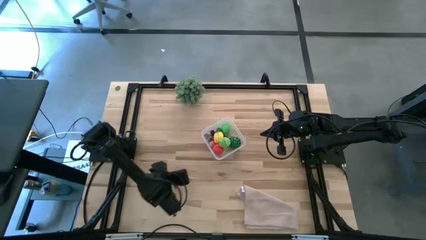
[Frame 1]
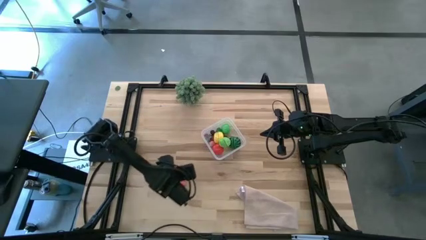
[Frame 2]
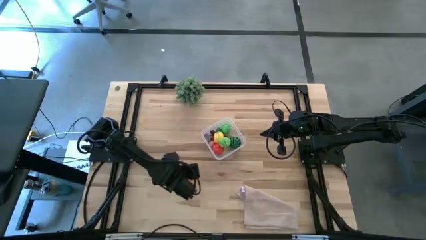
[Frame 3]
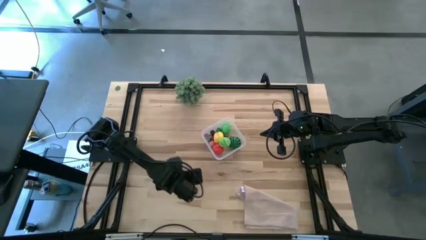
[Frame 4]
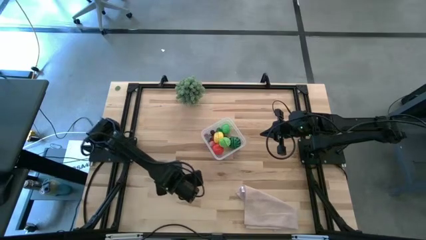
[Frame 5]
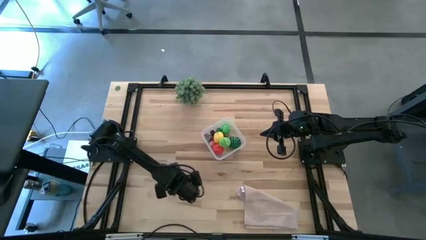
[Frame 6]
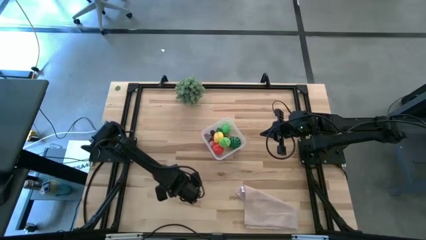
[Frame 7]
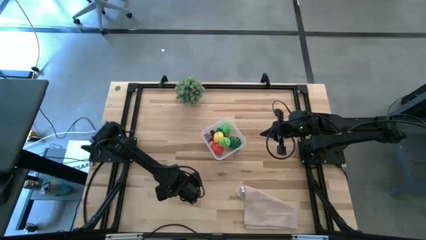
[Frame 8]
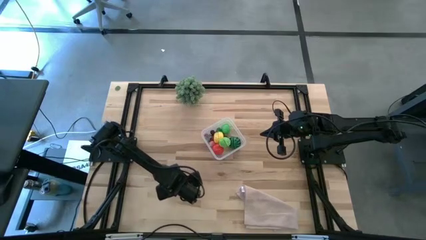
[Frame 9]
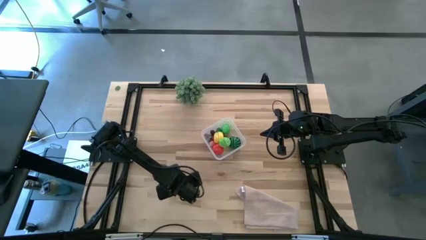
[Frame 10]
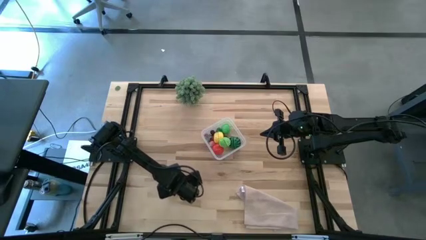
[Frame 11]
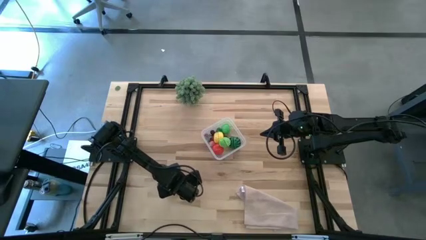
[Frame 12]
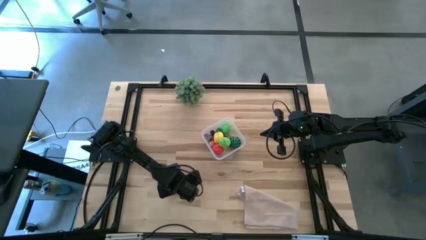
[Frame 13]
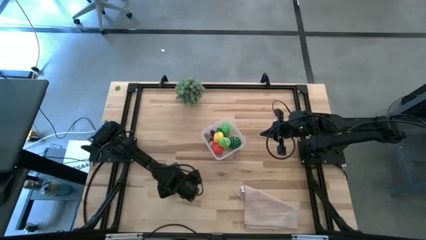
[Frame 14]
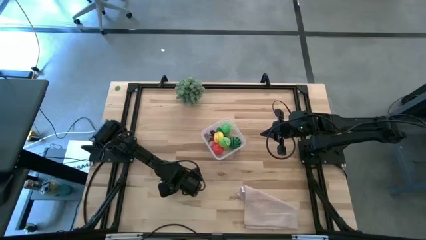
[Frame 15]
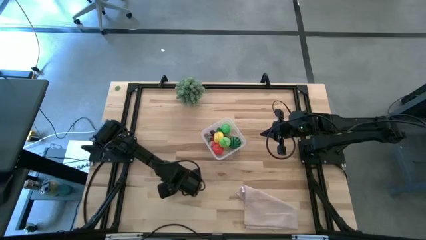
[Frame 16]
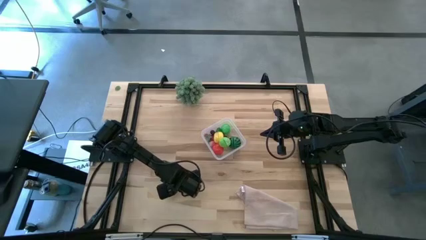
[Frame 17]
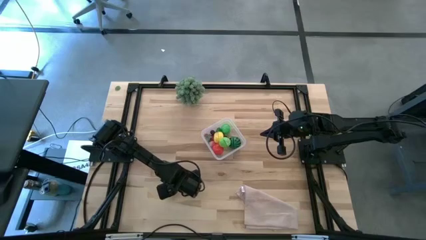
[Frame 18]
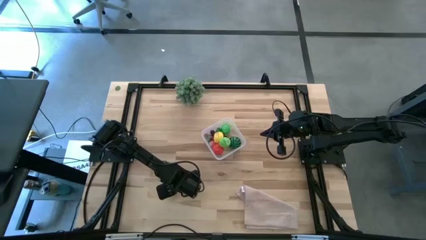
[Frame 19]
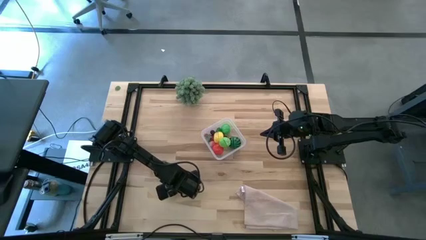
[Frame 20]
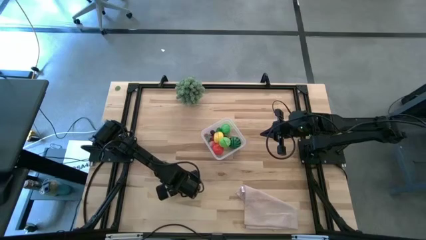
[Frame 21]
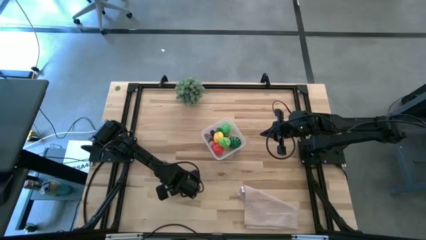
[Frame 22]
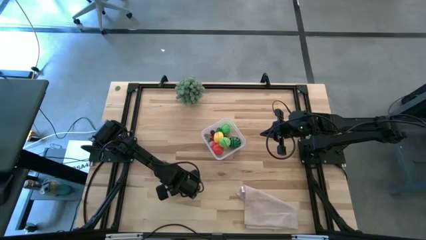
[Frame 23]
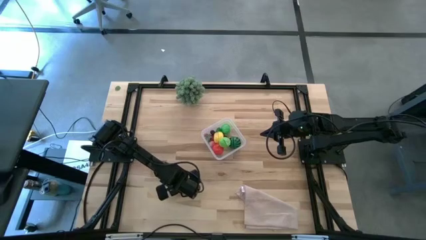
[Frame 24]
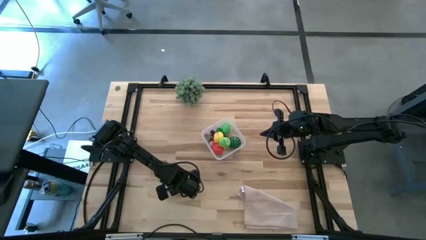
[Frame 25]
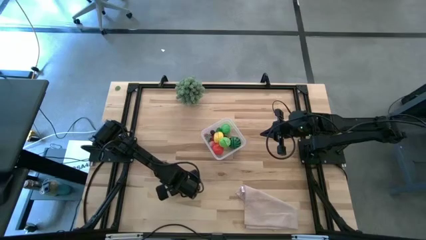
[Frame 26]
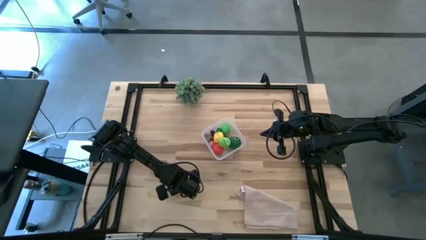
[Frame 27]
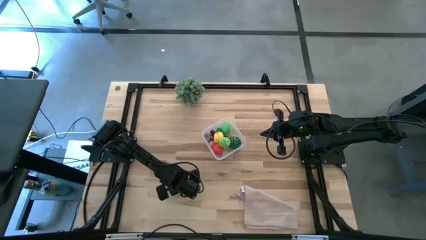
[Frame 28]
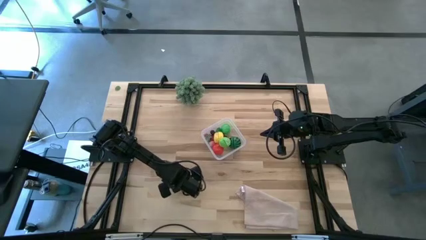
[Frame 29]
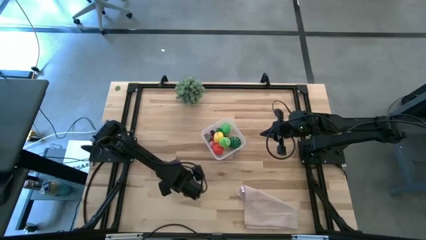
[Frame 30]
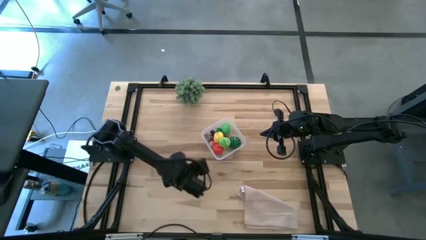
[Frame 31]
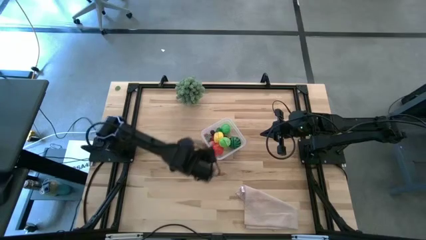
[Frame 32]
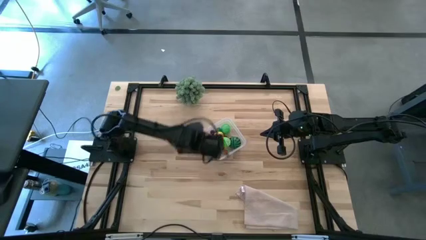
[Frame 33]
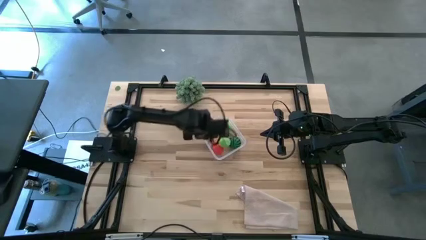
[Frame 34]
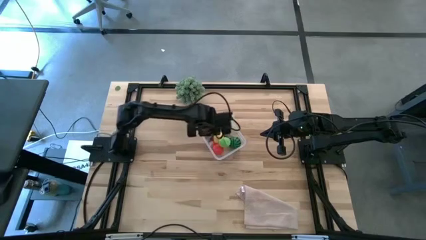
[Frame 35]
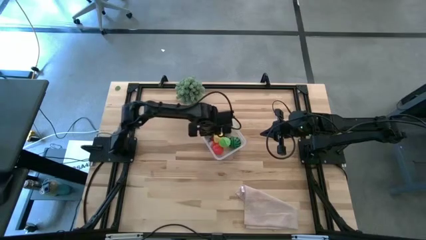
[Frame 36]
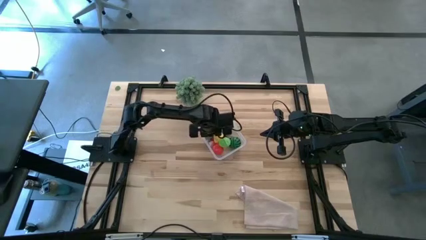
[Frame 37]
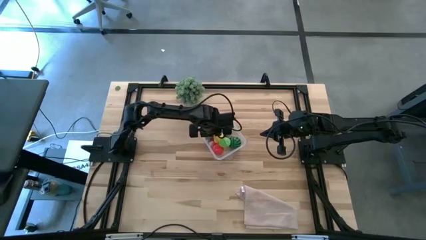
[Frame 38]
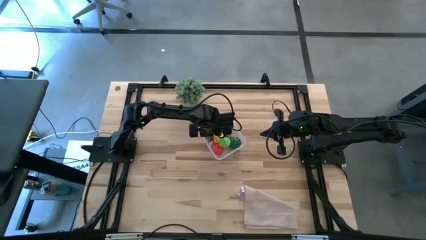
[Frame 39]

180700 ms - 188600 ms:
Task: Pick and placing Produce into tupperware
Put the red cherry into the transparent bin

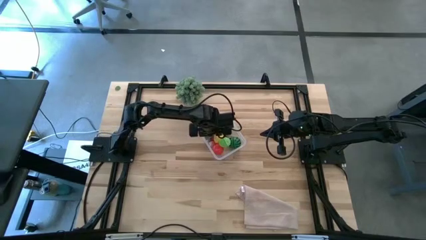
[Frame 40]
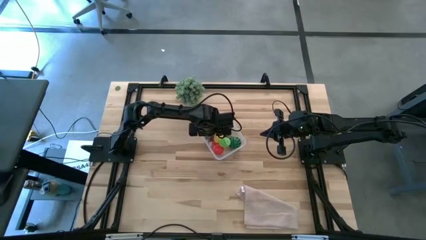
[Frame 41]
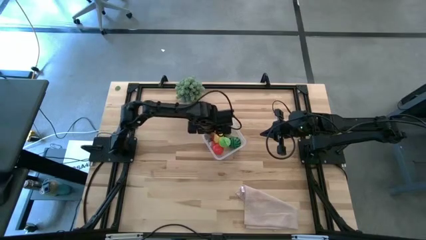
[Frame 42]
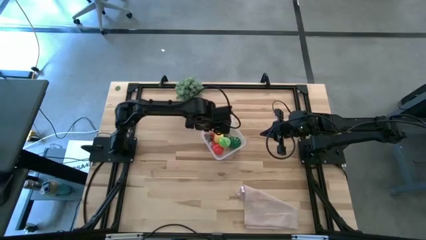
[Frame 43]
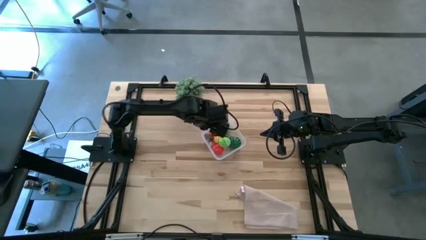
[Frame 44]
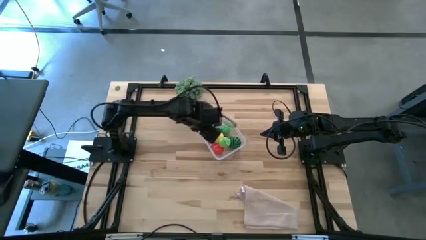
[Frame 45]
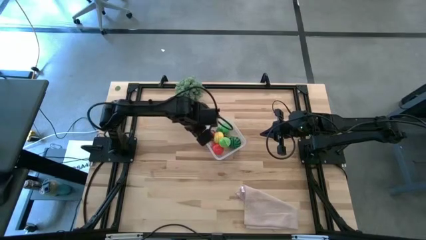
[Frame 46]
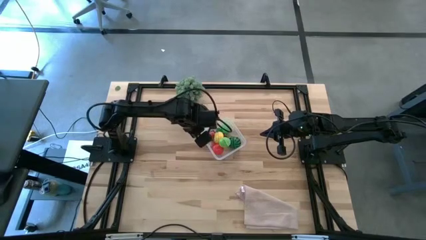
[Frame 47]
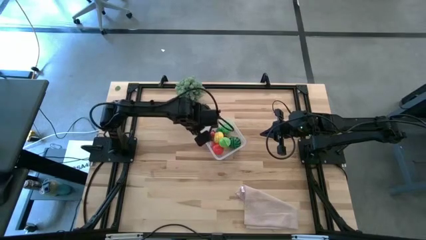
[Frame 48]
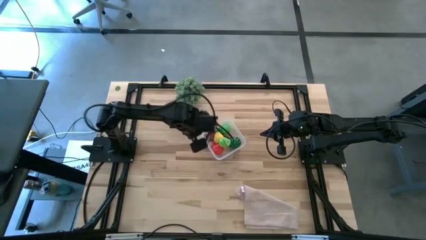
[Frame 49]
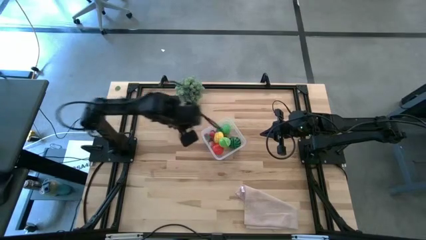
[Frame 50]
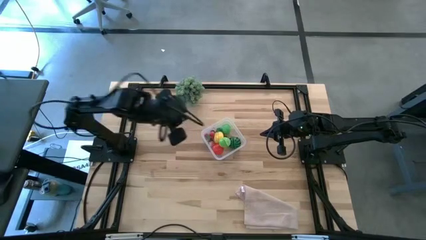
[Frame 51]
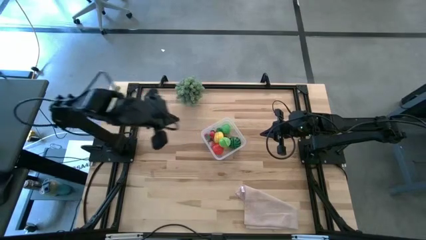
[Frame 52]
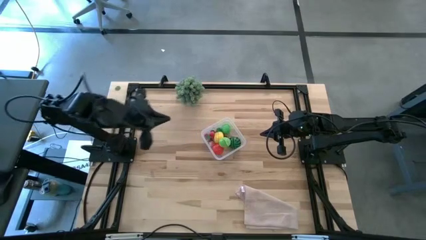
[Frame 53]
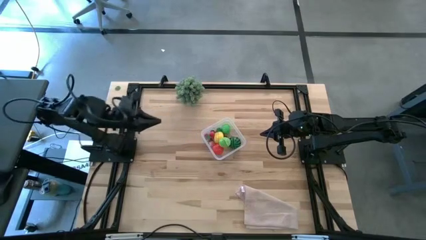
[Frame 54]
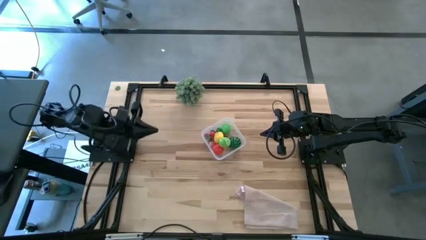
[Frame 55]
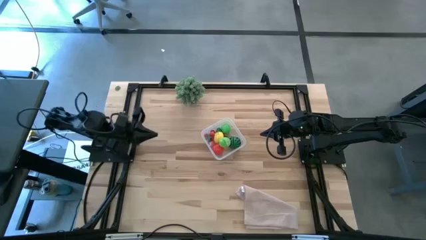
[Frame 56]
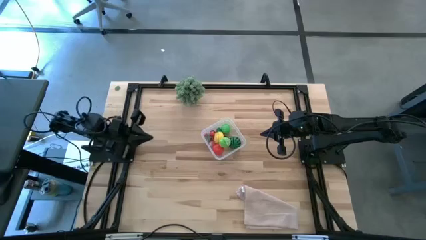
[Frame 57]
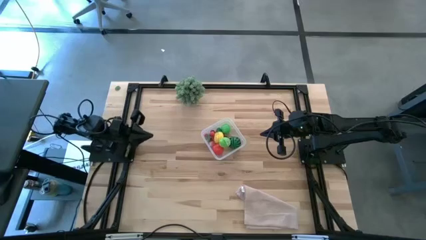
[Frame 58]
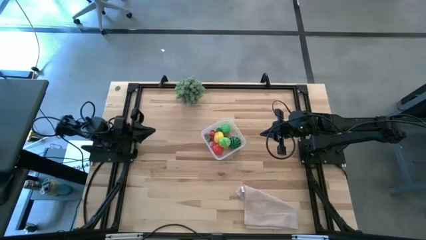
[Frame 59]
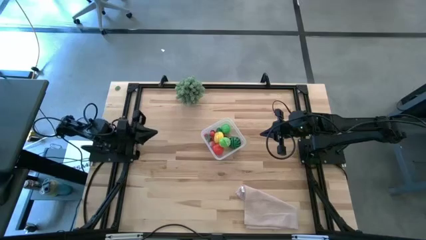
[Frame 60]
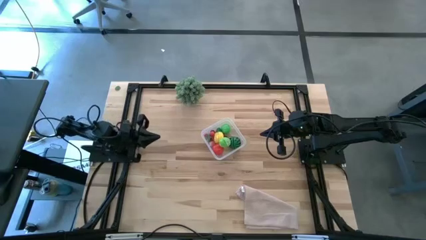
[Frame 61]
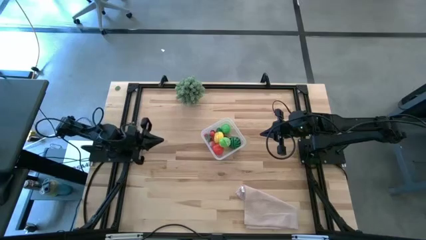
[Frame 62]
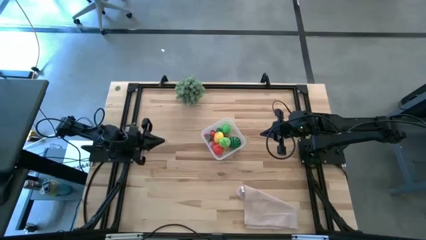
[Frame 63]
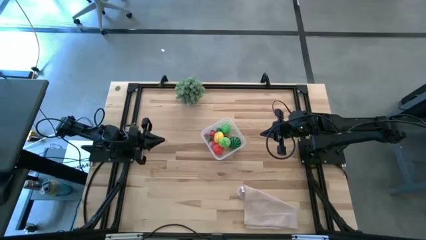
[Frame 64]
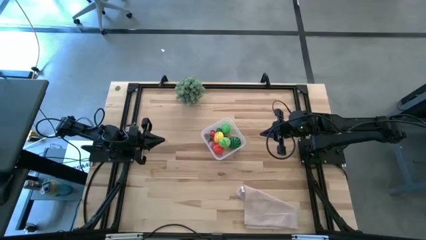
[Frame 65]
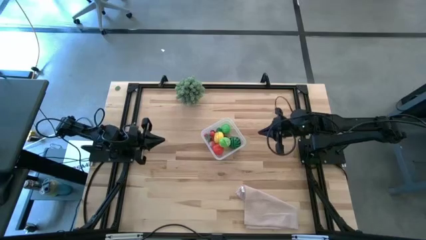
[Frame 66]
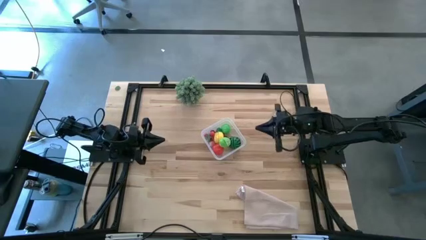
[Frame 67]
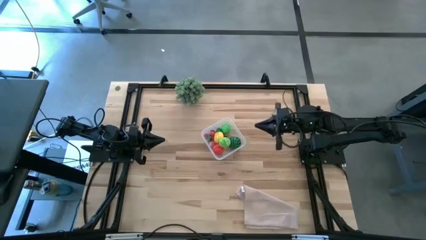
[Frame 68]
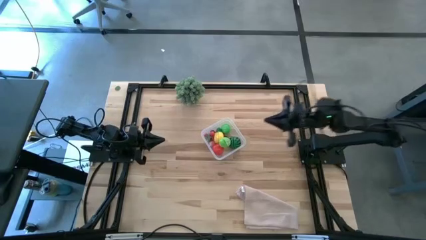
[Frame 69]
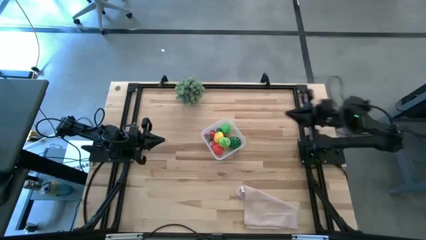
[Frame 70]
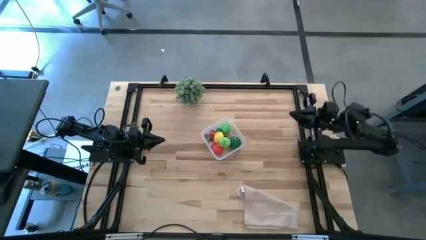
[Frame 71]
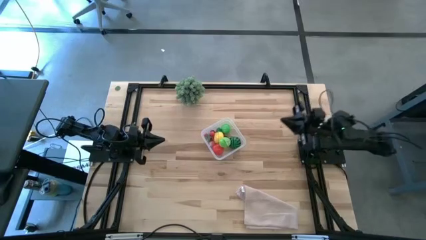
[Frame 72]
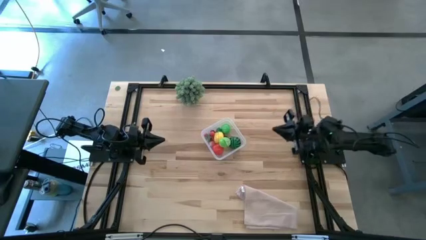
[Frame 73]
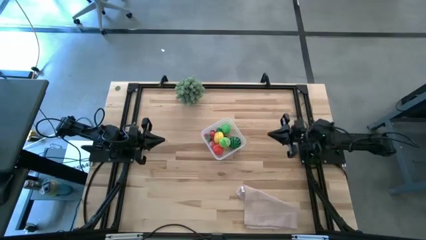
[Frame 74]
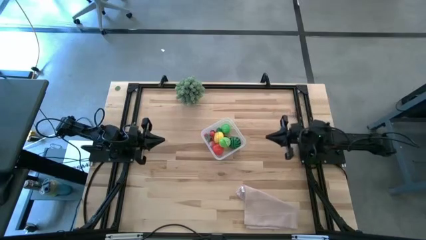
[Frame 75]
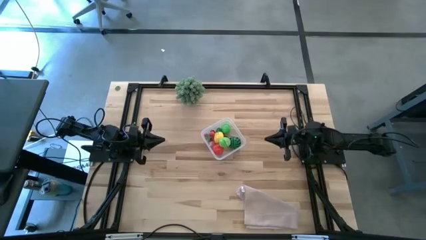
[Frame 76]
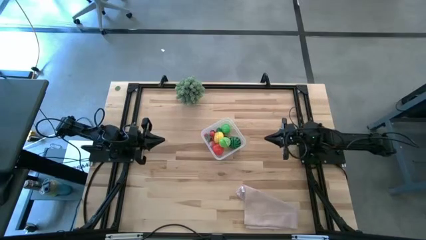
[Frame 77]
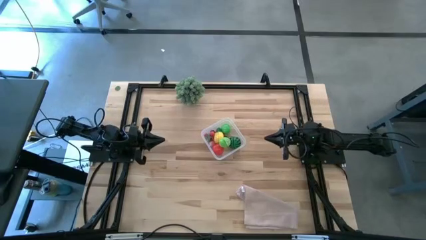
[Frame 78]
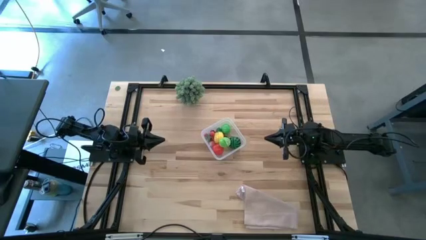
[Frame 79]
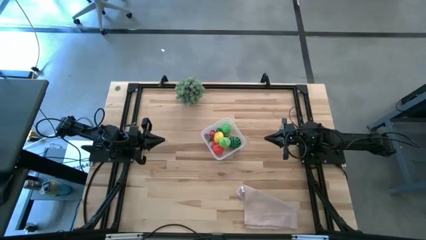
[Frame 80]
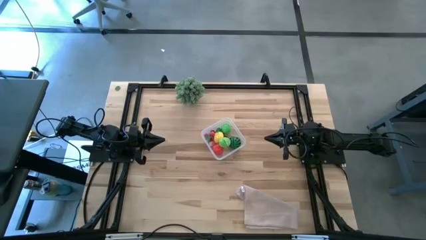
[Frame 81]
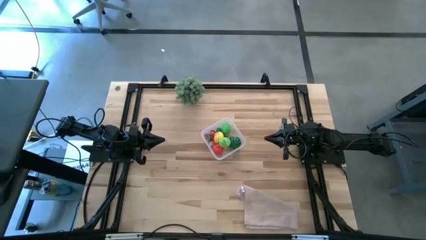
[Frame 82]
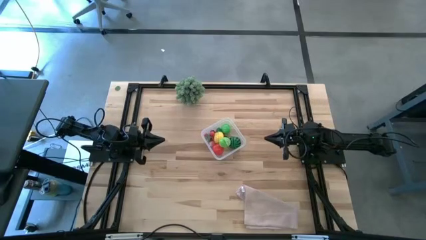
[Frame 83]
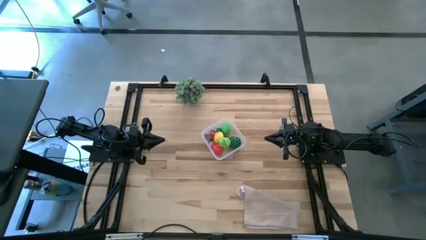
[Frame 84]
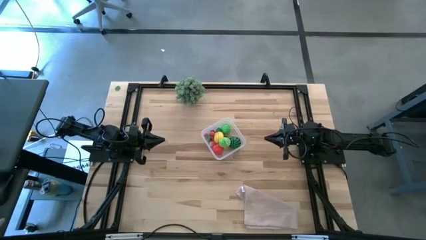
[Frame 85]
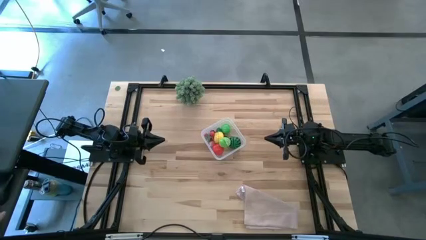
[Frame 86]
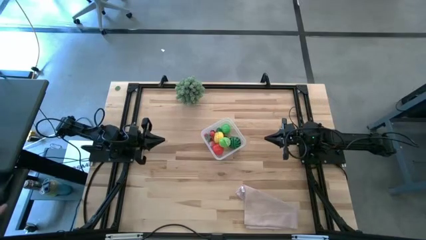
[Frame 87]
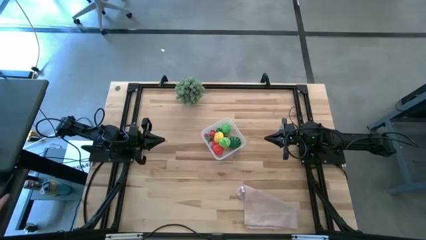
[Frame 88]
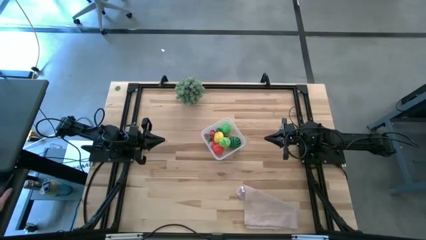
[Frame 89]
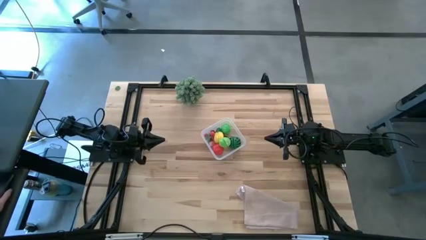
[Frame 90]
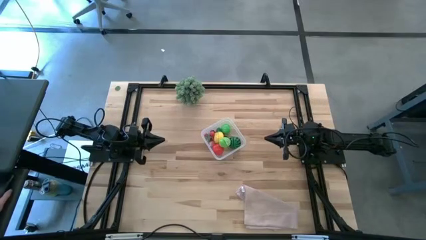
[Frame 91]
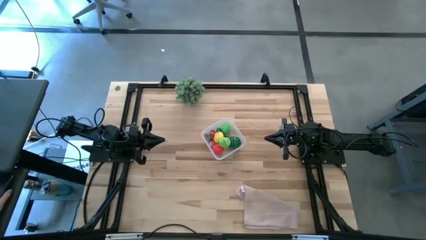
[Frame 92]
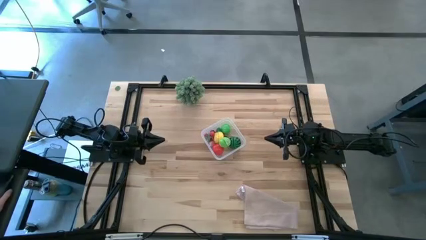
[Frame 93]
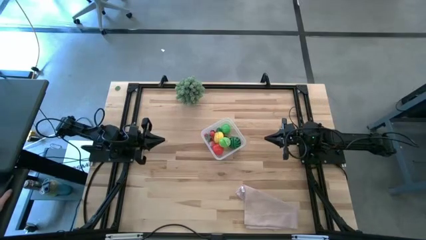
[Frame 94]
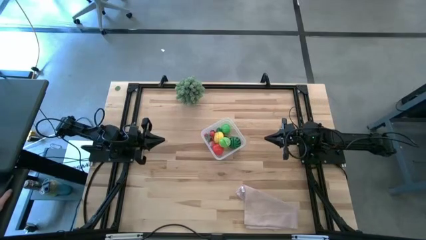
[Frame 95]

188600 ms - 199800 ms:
Return to Home Position
